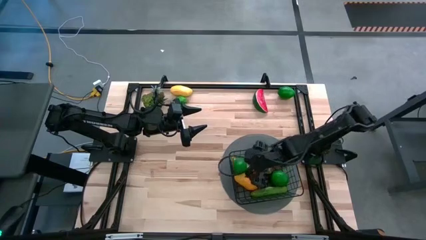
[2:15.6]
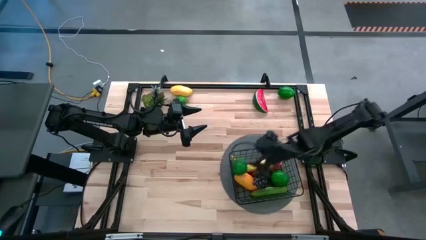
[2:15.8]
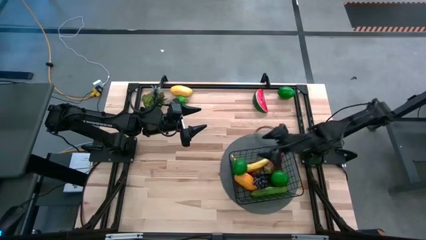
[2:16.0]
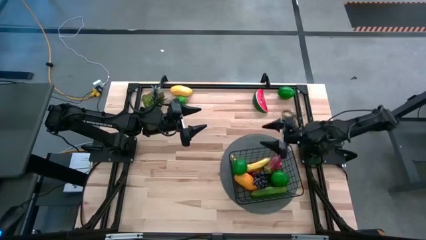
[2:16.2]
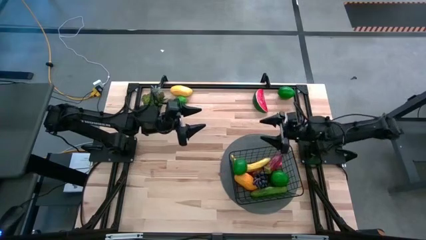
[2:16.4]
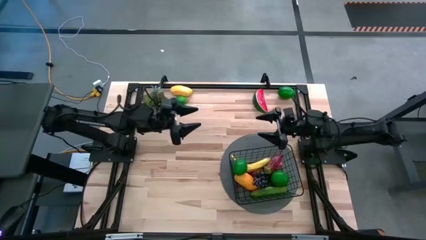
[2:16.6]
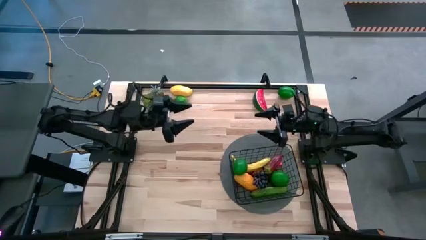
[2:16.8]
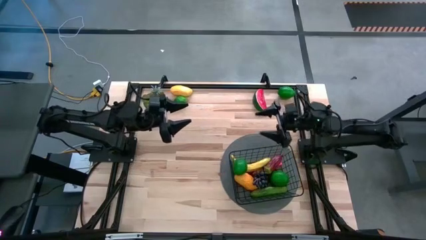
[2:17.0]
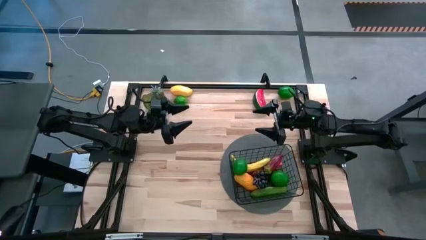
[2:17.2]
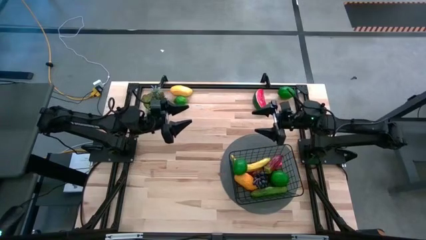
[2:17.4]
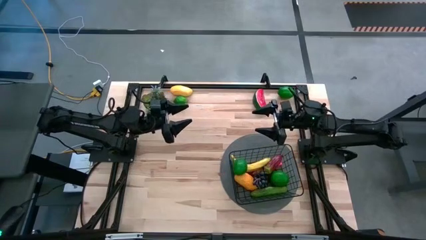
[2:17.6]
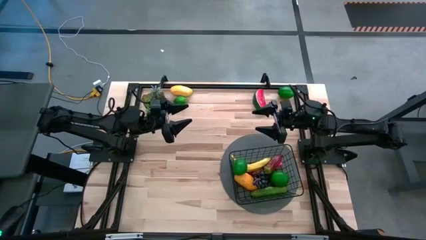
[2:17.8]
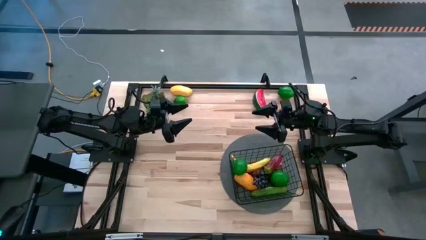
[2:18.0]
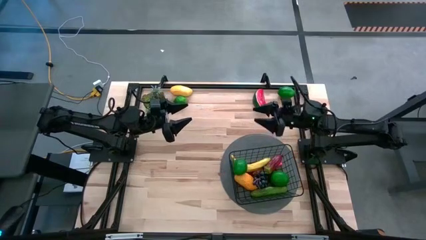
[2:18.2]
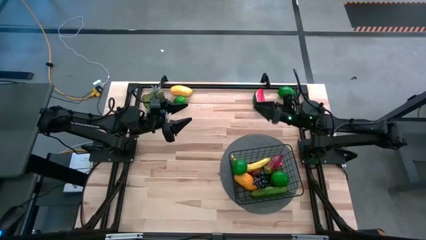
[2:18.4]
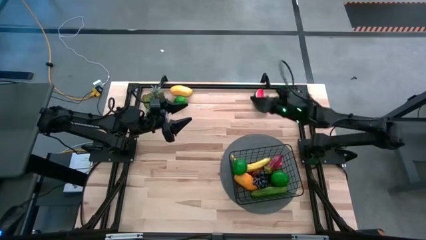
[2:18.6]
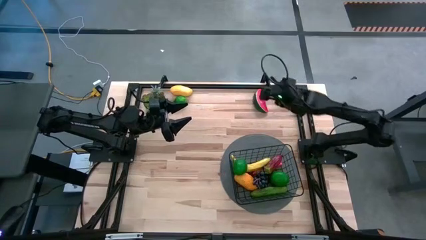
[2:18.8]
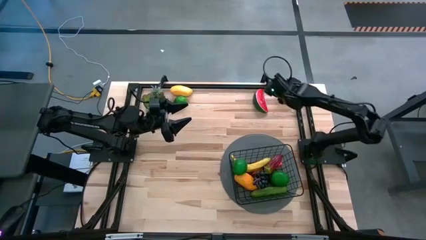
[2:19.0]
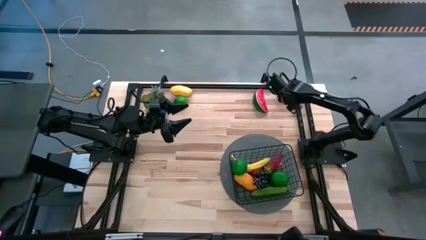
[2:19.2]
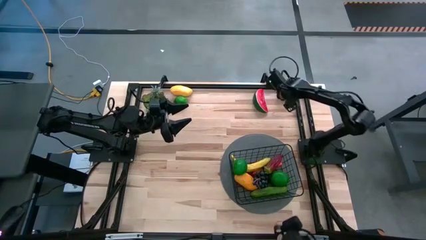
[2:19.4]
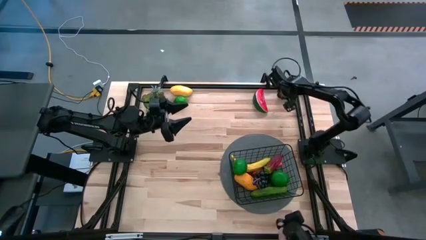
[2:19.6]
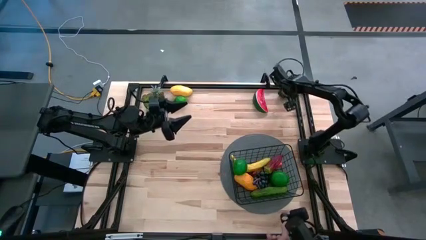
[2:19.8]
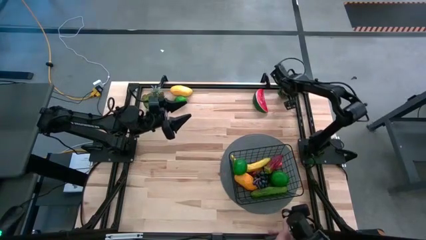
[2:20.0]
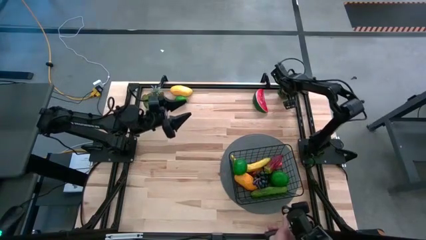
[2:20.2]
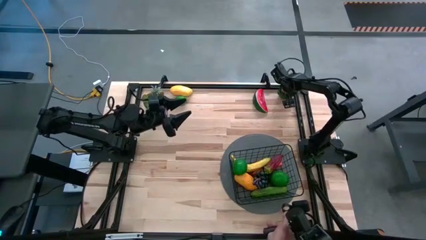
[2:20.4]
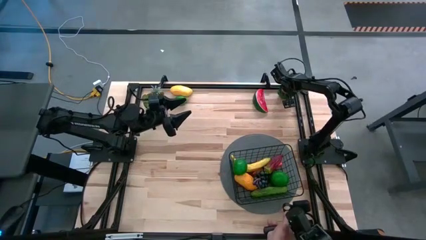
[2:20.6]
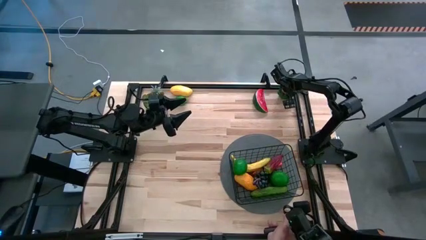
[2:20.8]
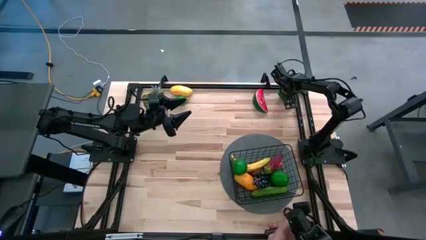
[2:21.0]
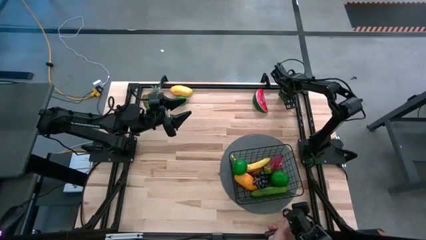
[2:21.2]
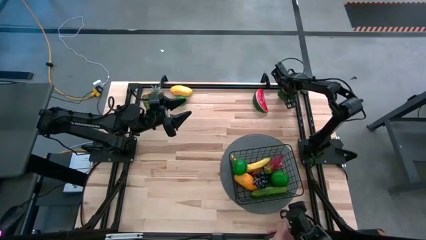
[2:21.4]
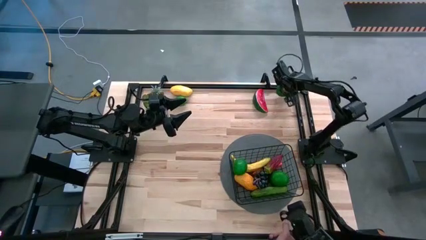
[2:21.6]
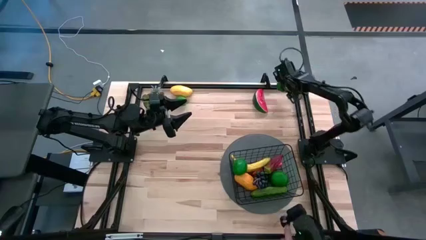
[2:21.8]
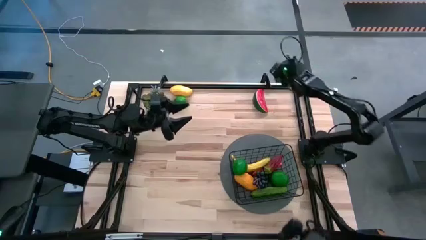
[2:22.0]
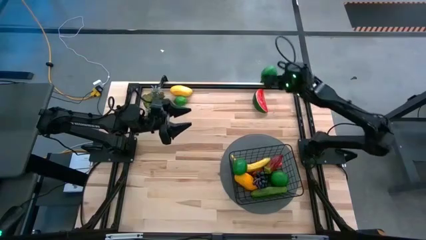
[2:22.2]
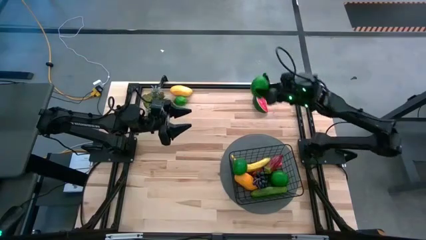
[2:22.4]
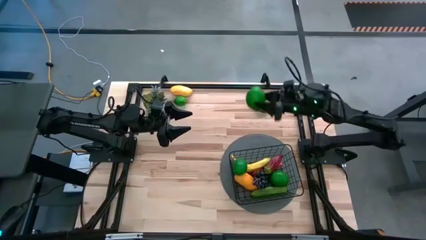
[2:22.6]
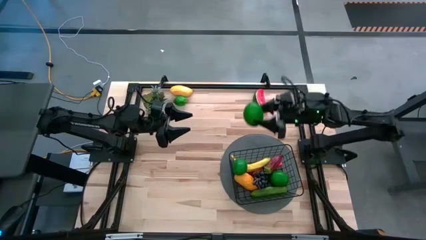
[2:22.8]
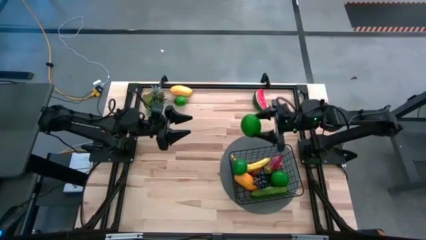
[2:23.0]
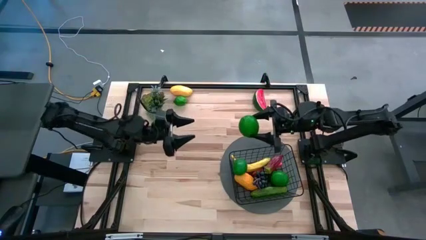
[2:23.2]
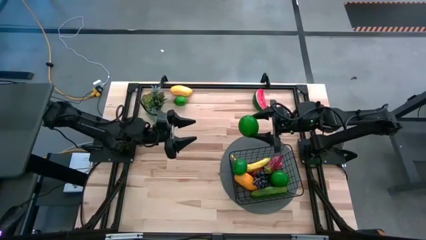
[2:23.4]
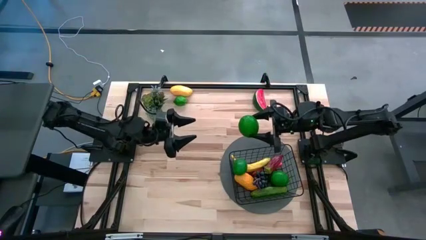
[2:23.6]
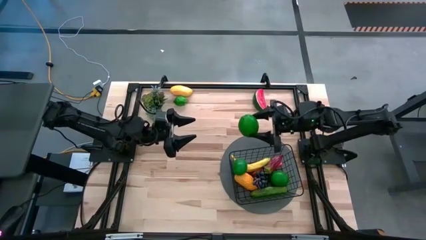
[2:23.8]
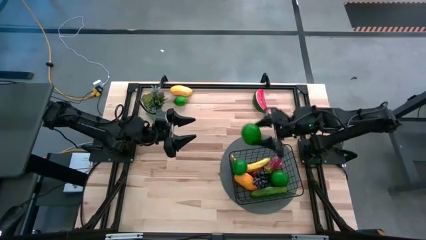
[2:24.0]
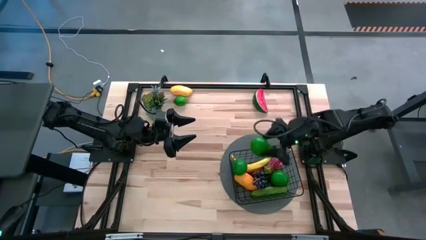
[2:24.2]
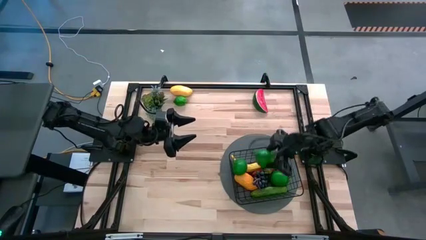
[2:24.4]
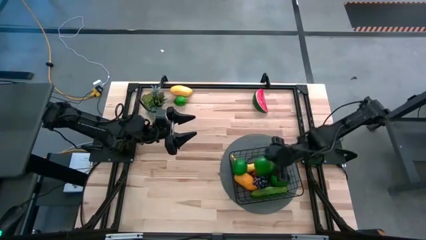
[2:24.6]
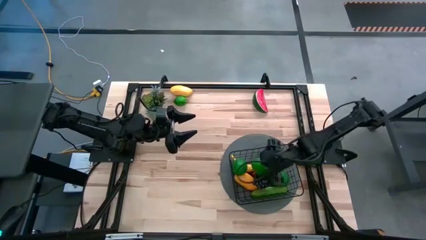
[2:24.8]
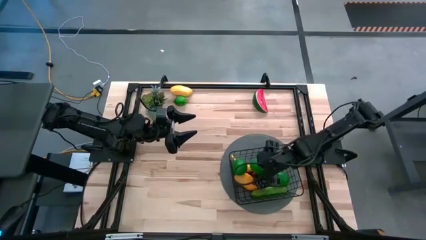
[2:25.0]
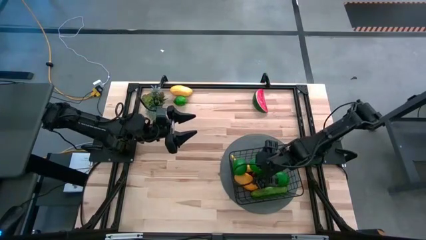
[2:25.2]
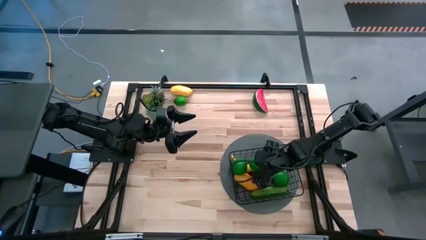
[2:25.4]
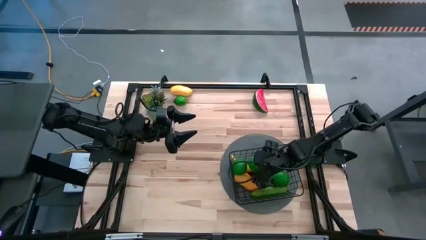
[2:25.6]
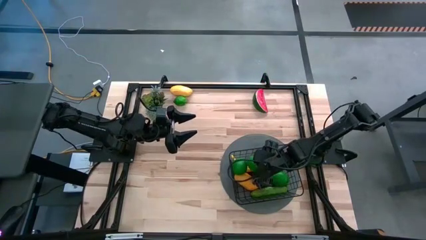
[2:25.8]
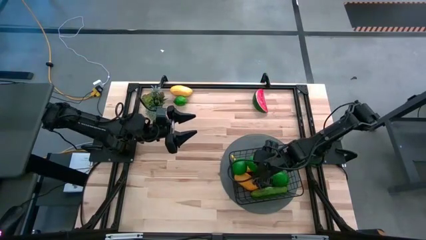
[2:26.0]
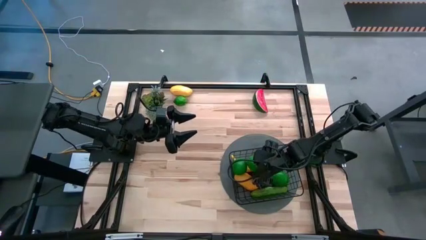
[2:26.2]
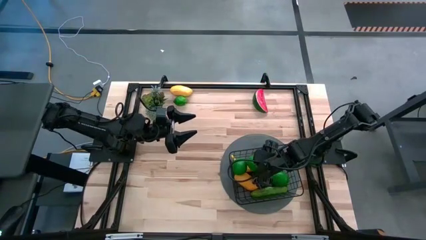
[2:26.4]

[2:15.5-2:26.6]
Task: Build produce basket
Put the green lime into the black basket

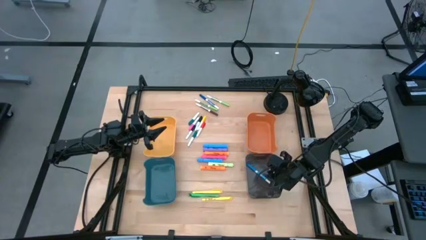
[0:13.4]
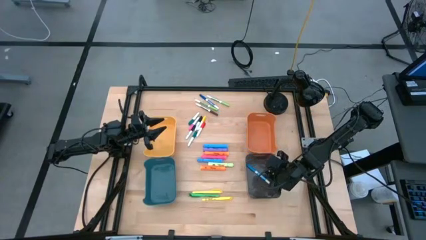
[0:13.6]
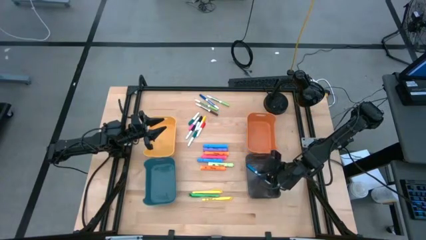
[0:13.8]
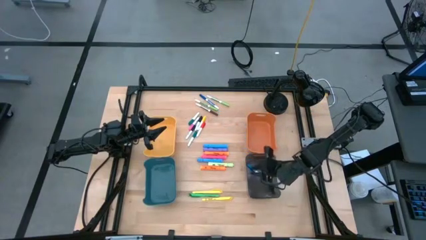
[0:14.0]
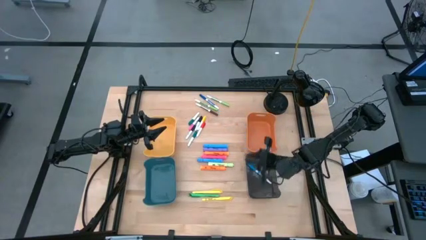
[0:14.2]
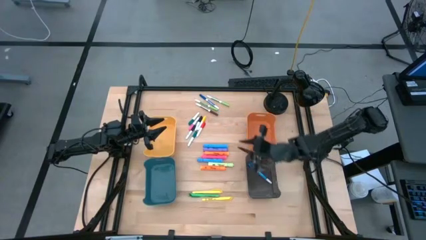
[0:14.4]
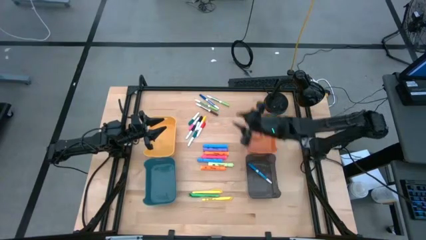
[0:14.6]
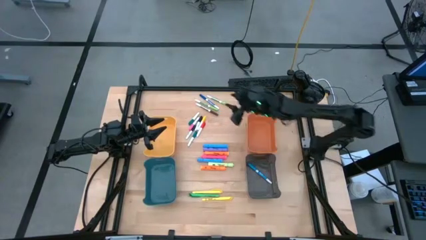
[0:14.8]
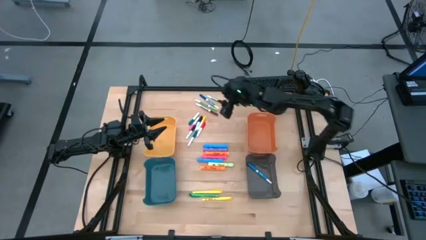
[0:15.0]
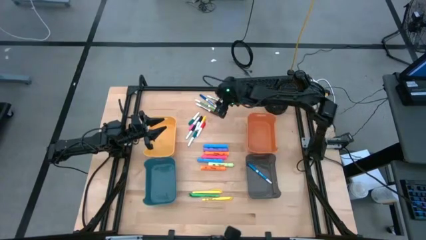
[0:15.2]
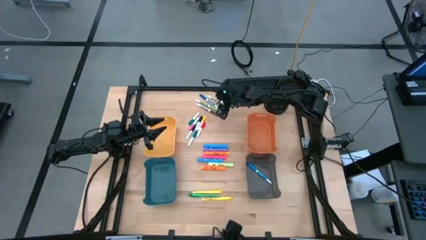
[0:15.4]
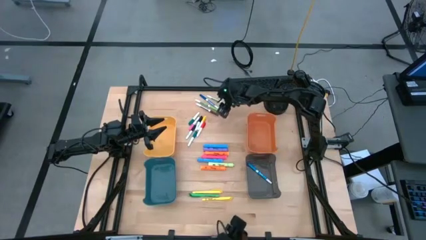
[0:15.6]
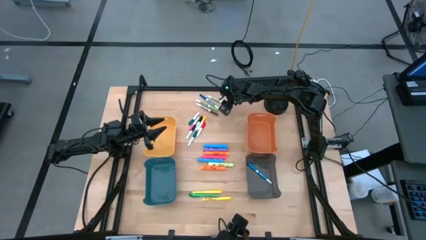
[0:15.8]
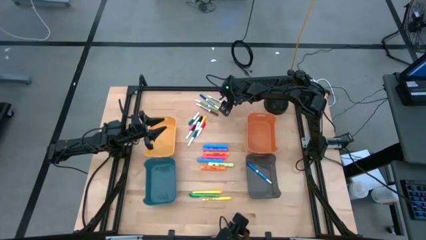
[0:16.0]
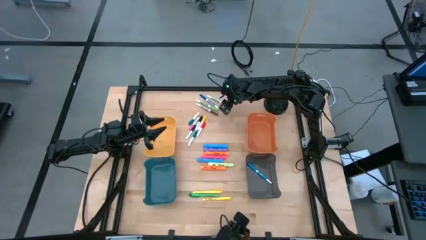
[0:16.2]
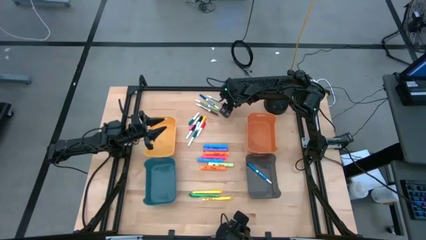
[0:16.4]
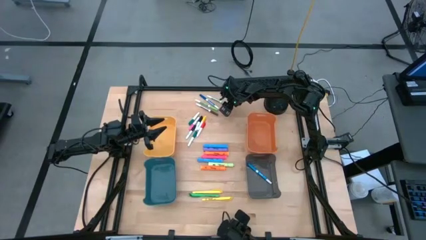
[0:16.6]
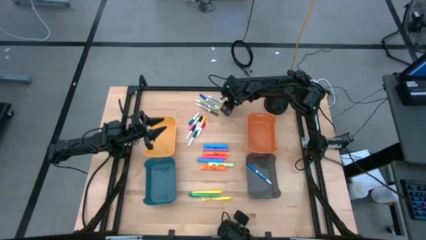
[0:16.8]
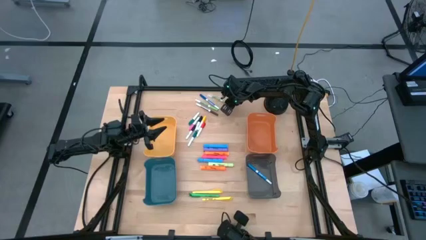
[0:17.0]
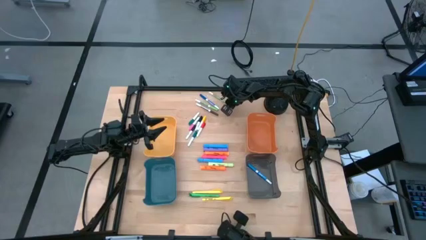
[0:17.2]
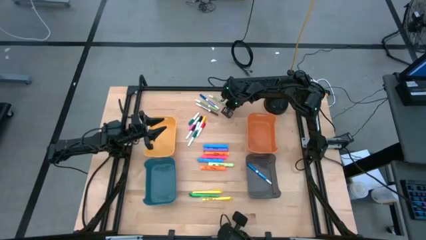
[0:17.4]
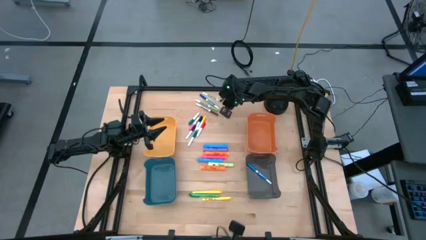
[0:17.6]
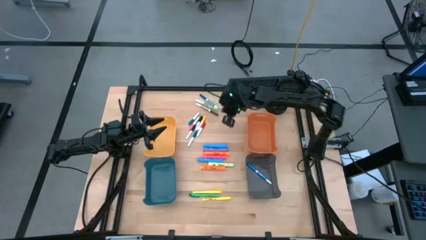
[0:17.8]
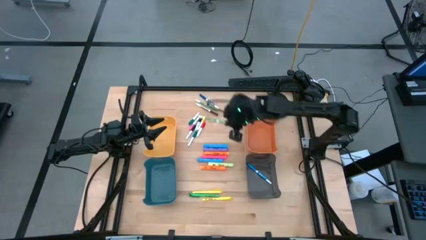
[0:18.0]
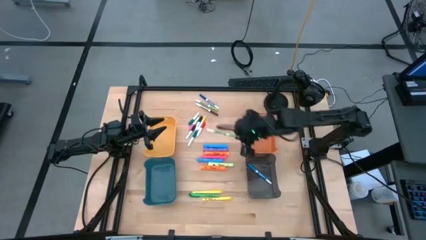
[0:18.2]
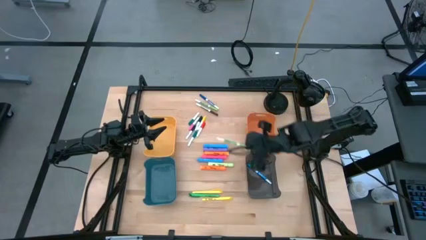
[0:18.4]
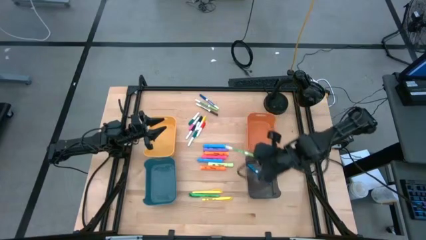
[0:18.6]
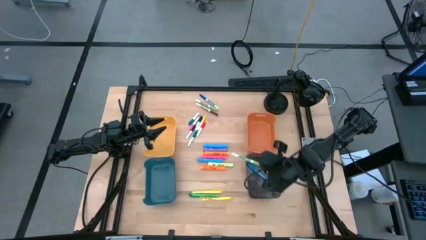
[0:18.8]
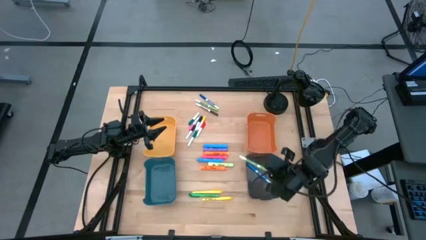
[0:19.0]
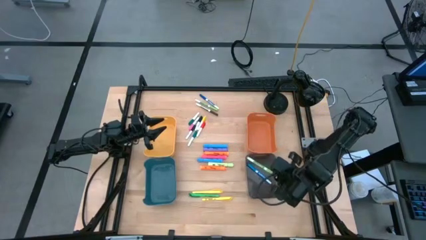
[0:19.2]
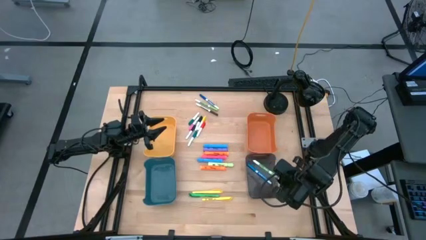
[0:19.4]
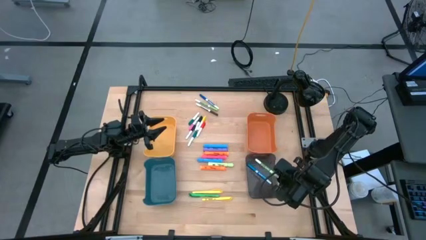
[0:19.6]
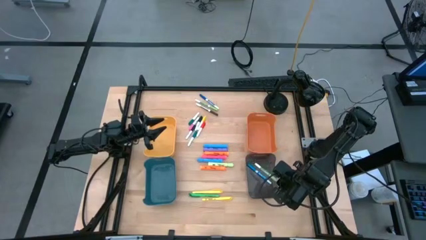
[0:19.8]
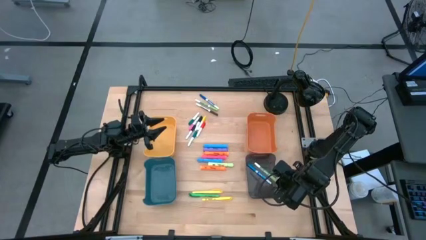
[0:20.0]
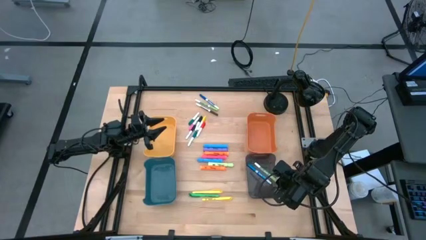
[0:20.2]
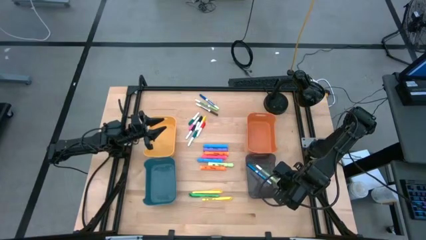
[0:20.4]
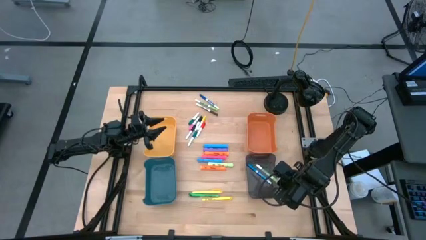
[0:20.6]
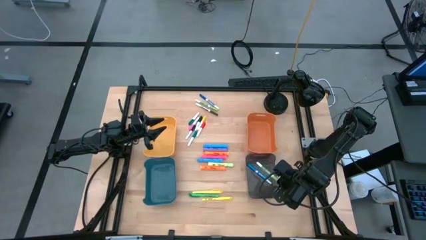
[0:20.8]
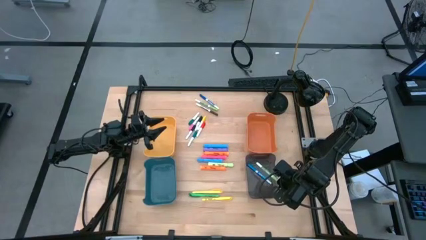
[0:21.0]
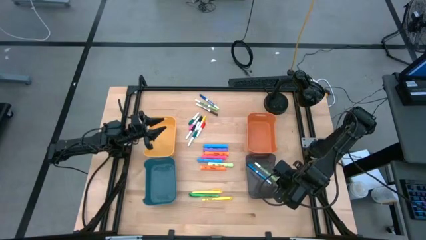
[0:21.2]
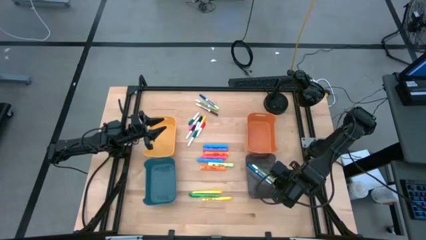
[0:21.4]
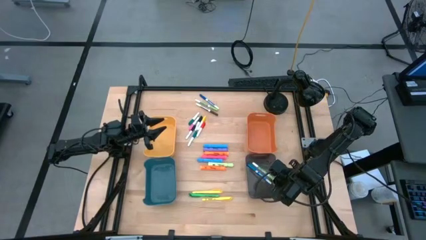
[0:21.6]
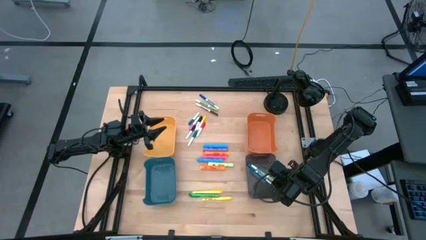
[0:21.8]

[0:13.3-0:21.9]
Task: Pick & Place Markers
Put the top green dry erase marker into the black bin
